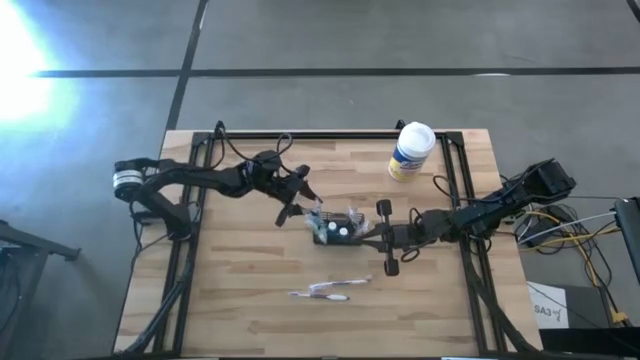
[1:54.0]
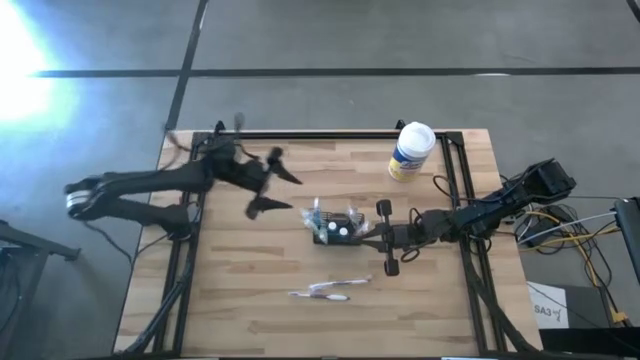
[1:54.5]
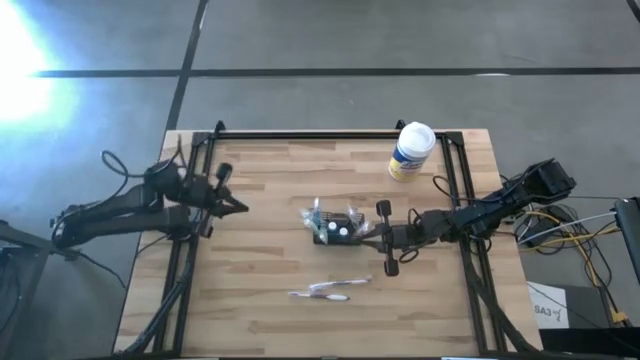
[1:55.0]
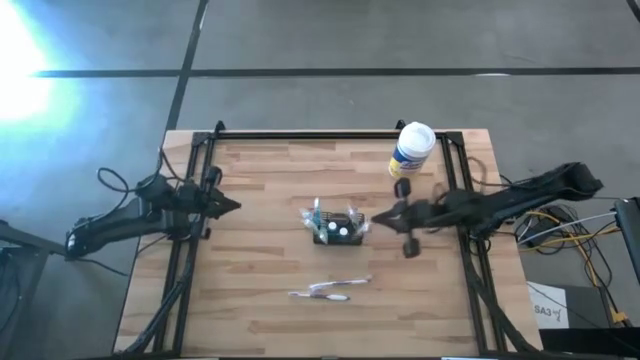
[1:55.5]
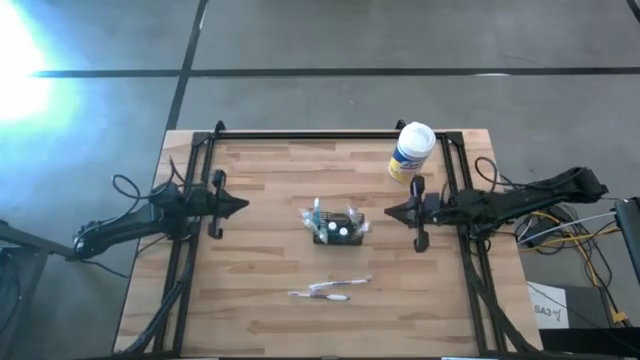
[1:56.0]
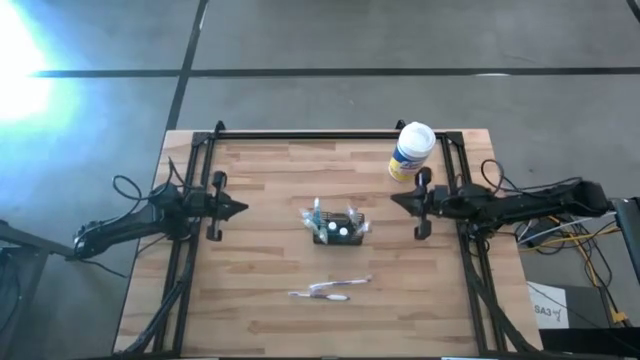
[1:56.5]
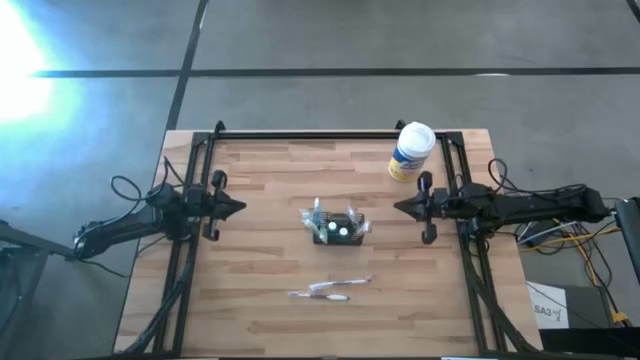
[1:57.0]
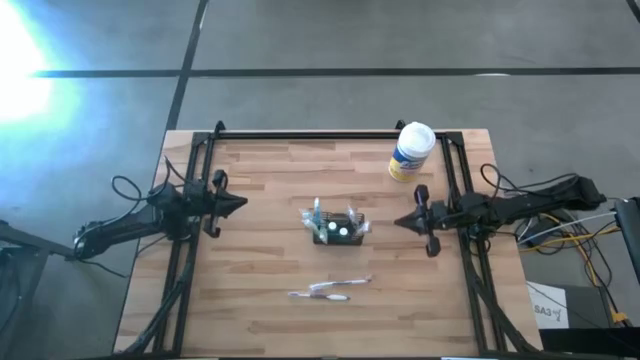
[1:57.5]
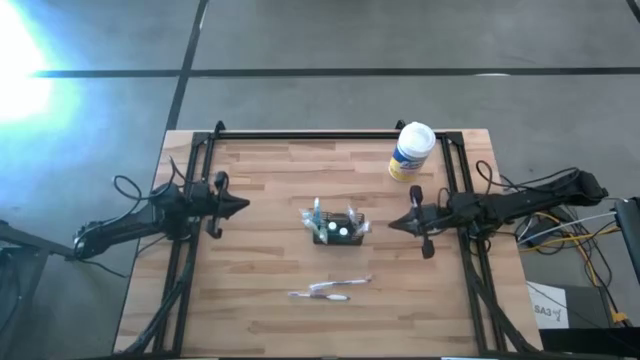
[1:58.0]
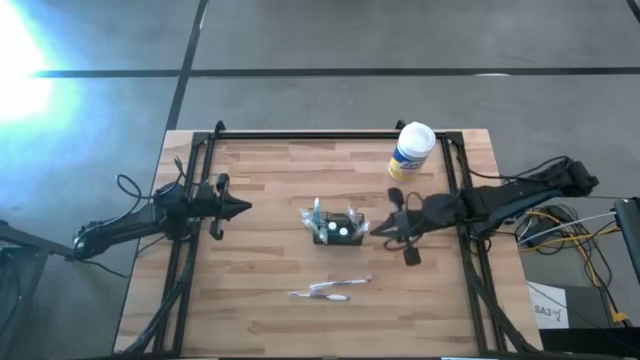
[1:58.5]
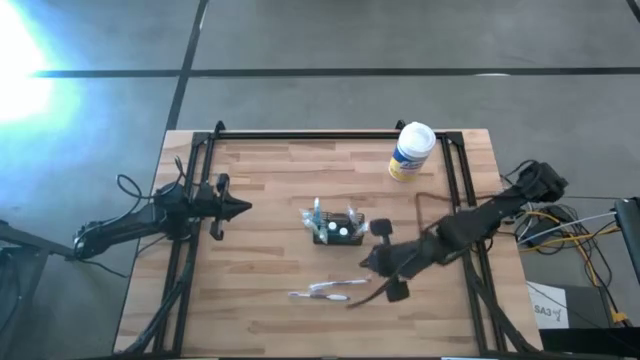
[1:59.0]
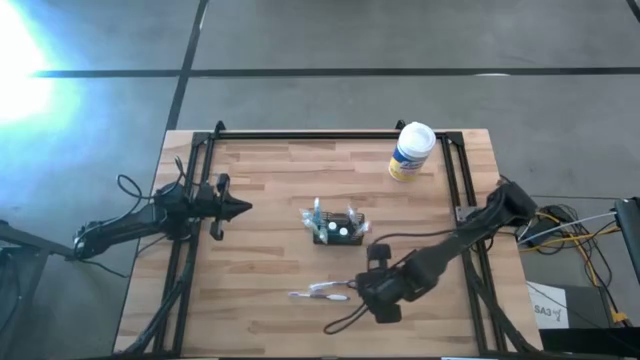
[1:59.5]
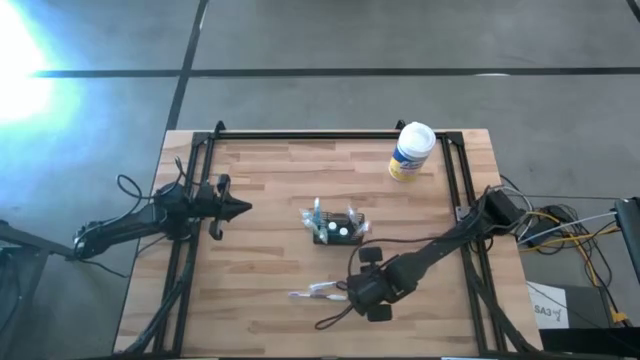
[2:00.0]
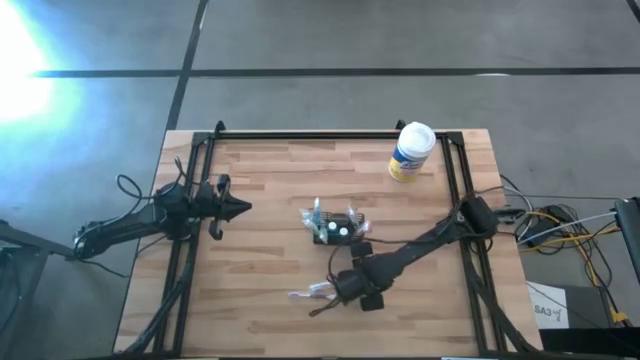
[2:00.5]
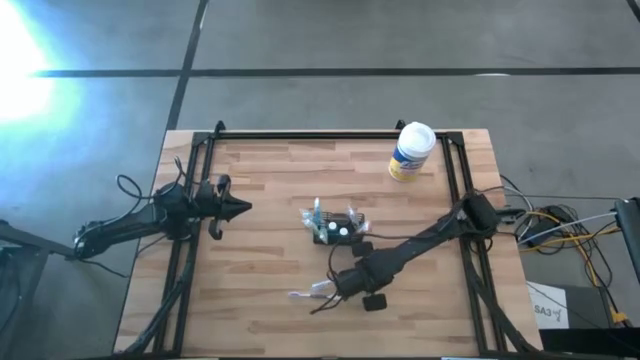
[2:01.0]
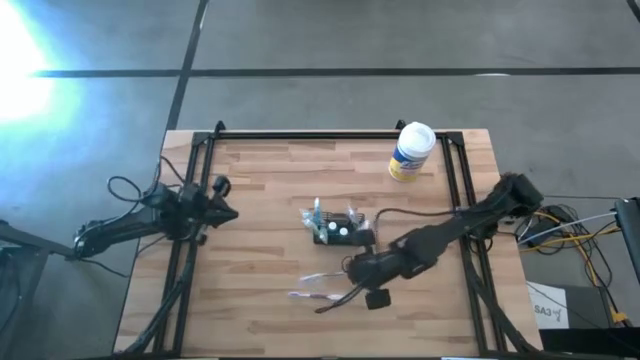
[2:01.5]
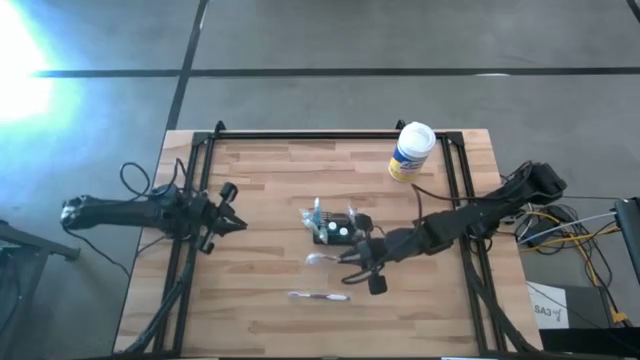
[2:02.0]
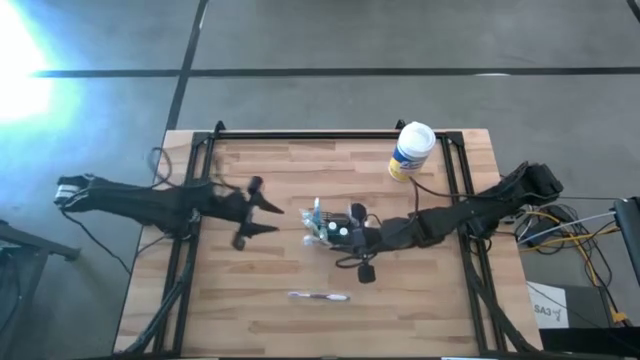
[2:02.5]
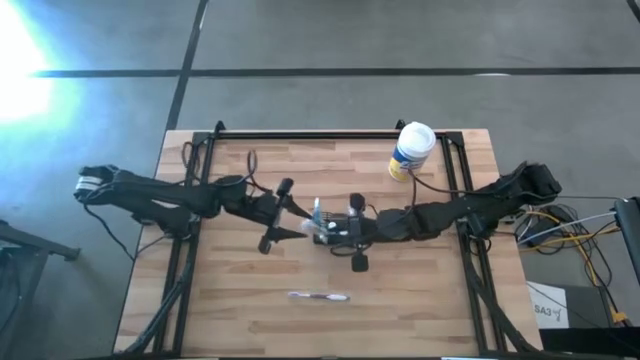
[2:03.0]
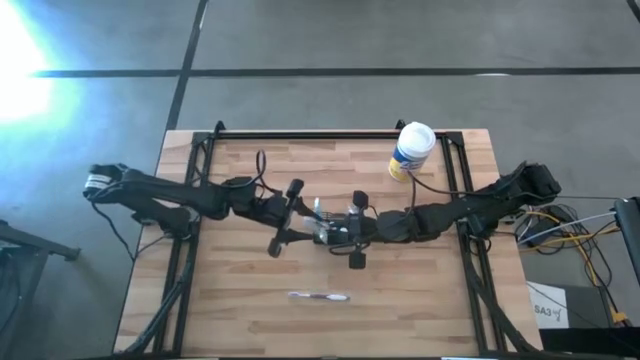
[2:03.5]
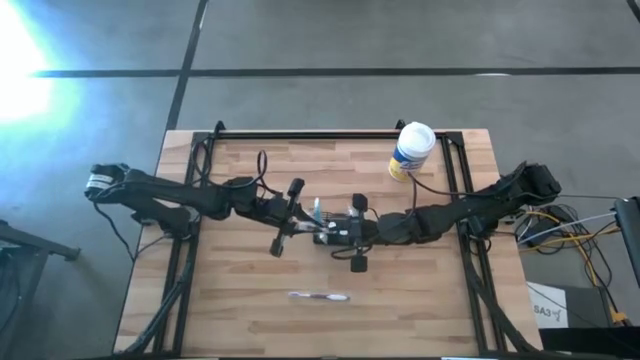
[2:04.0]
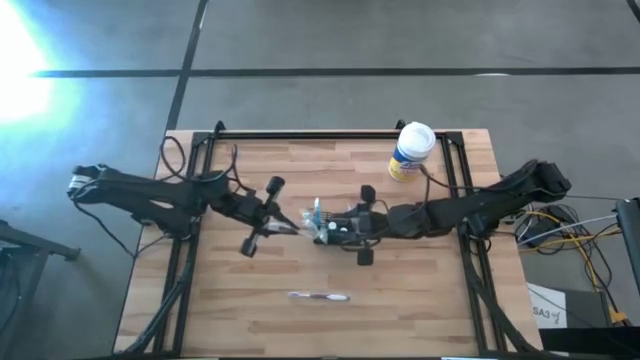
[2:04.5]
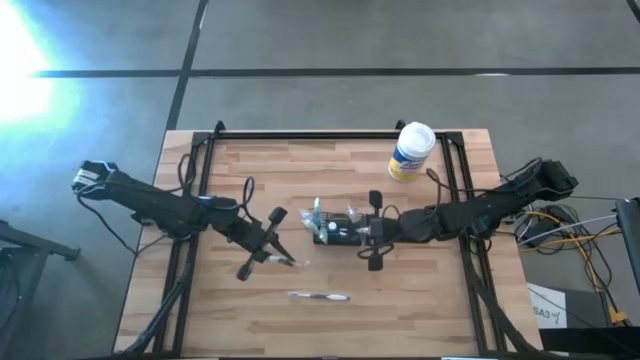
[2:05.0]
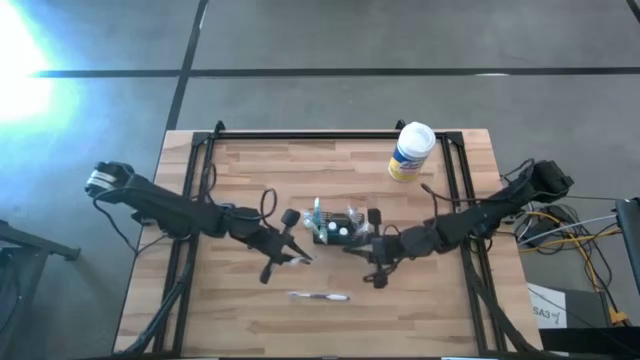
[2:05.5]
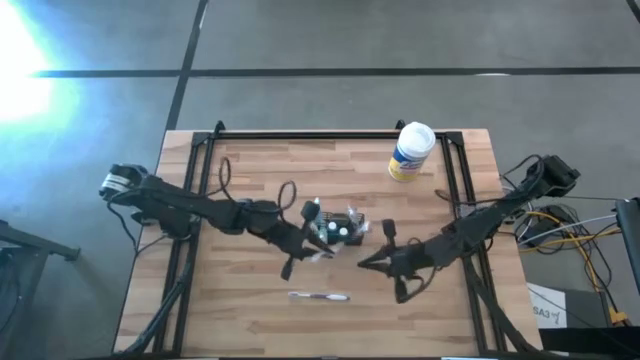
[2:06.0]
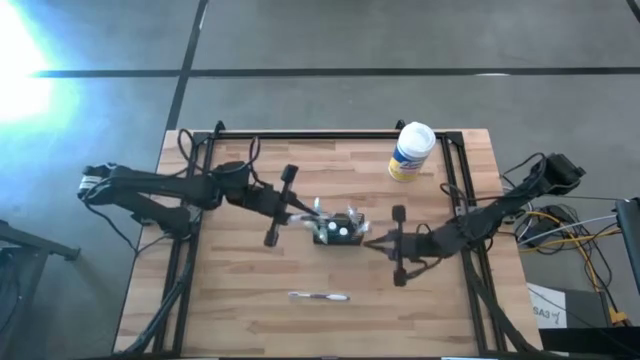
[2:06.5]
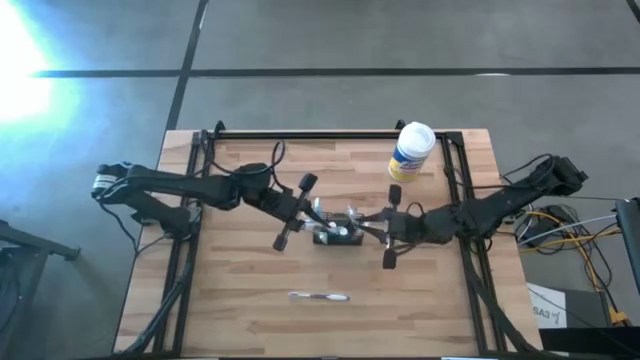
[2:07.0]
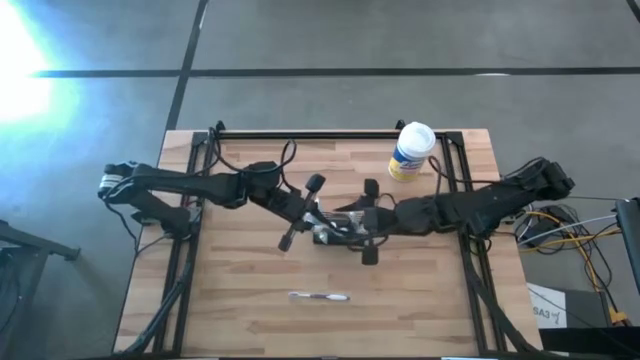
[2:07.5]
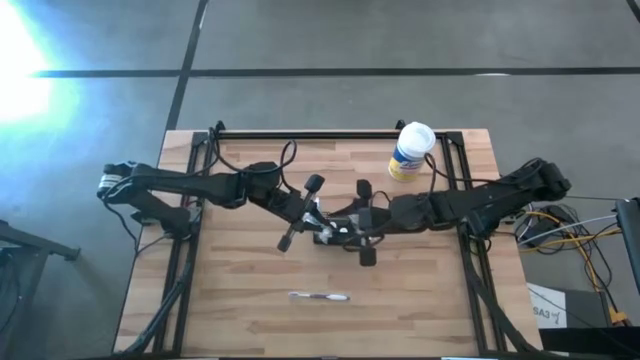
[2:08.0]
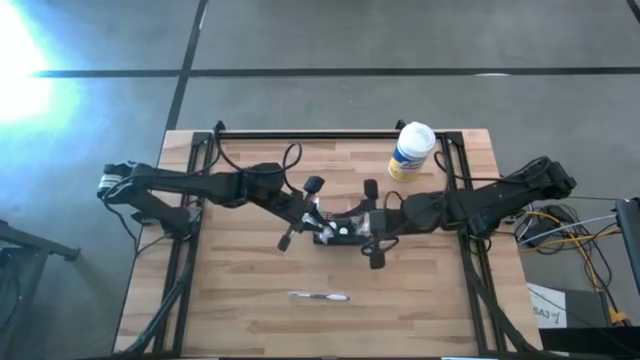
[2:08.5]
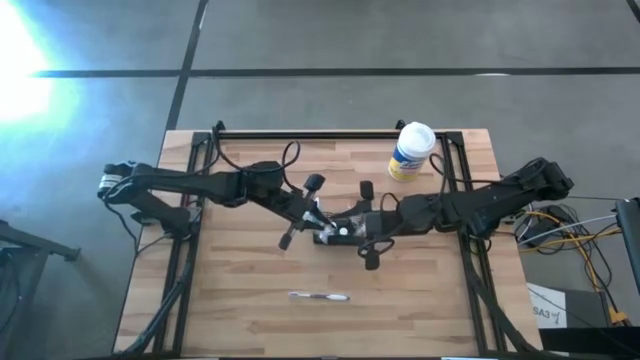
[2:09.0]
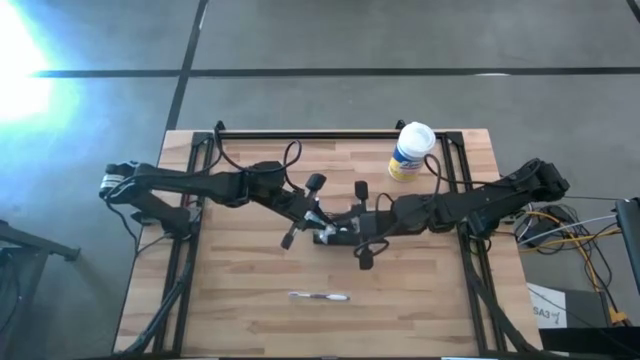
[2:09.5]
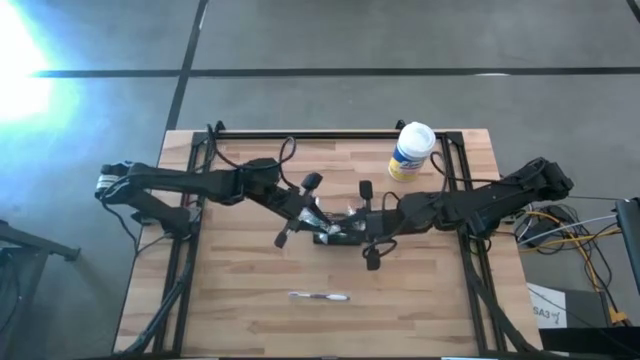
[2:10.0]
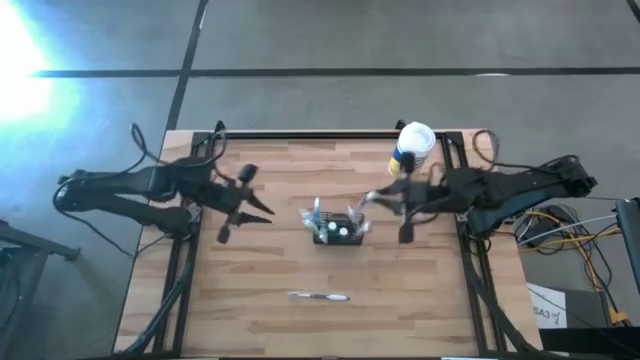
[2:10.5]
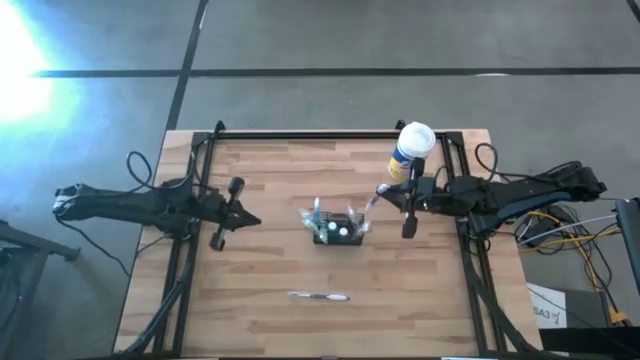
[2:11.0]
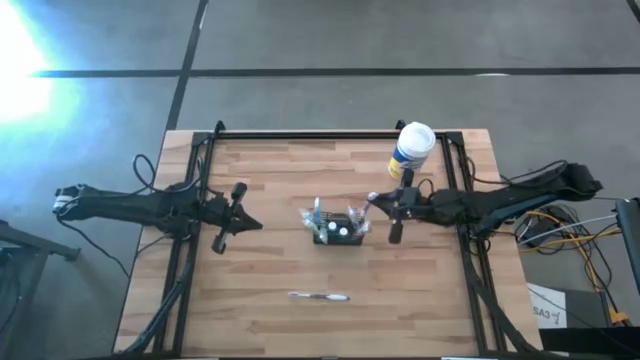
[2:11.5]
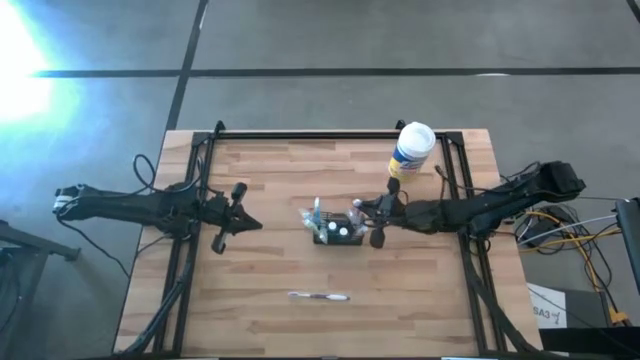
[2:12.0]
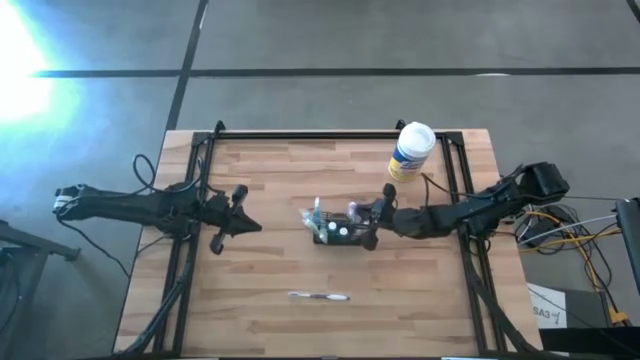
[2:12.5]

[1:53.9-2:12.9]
Task: Pick & Place toothbrushing station
Put the top purple toothbrush into the black mesh organizer

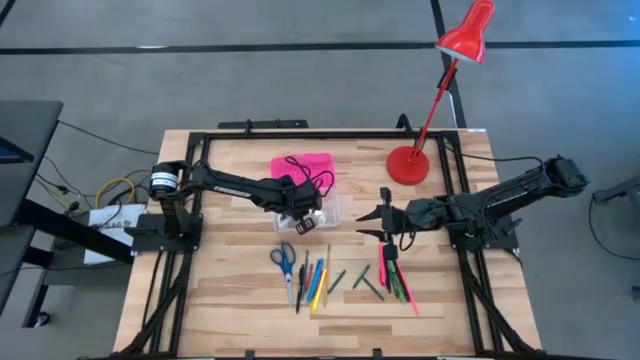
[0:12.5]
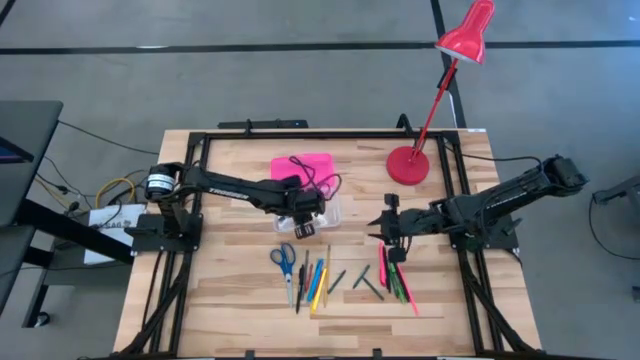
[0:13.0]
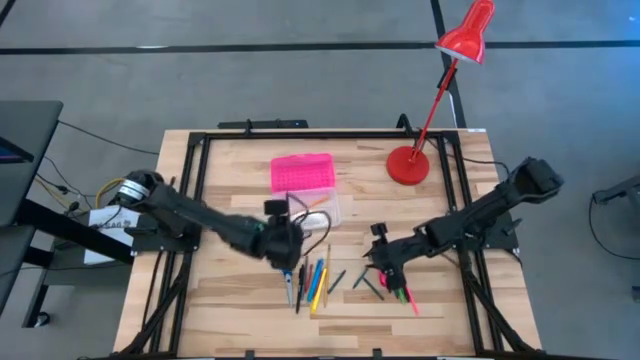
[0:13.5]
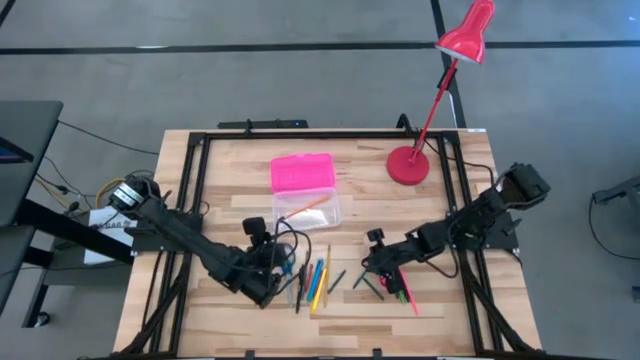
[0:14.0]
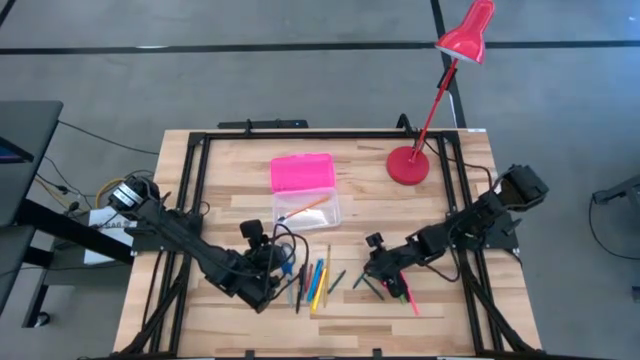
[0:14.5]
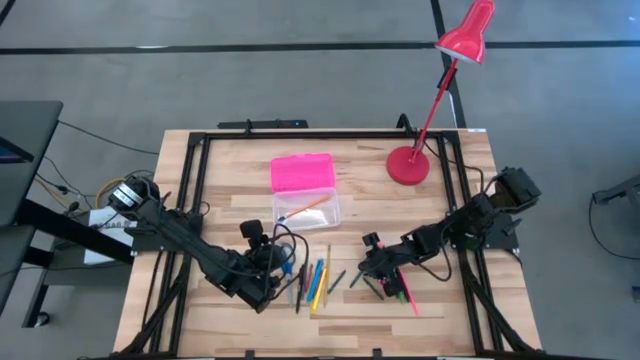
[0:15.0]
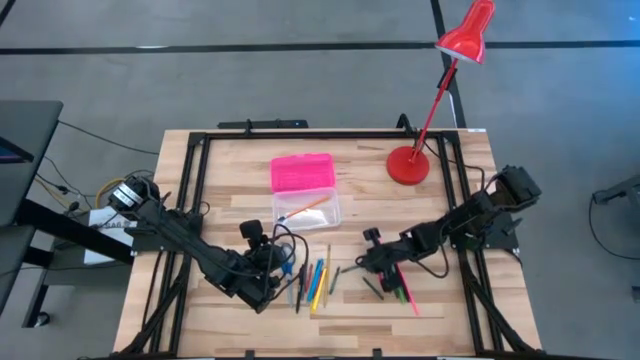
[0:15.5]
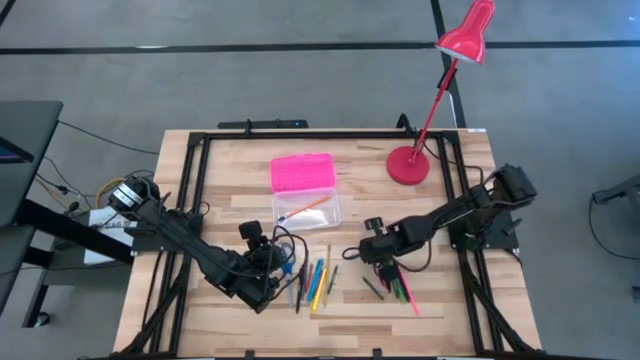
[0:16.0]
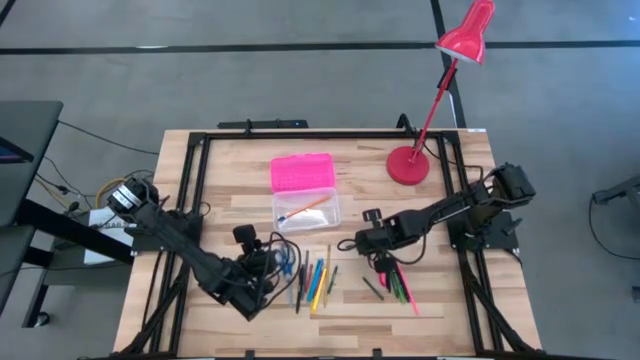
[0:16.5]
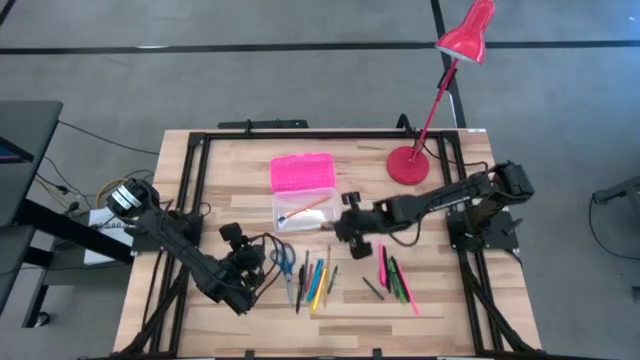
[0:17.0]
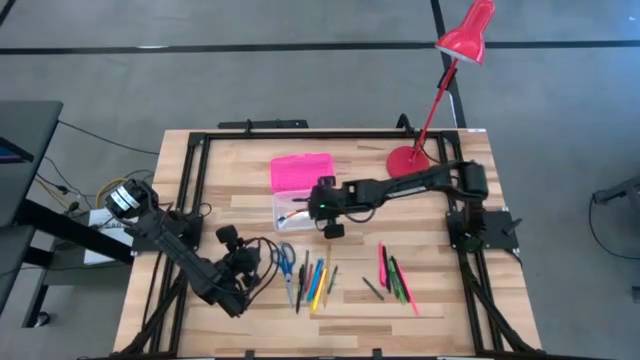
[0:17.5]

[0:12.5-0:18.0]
Task: Pick & place school supplies into a supply box
Put the green crayon into the pink supply box
